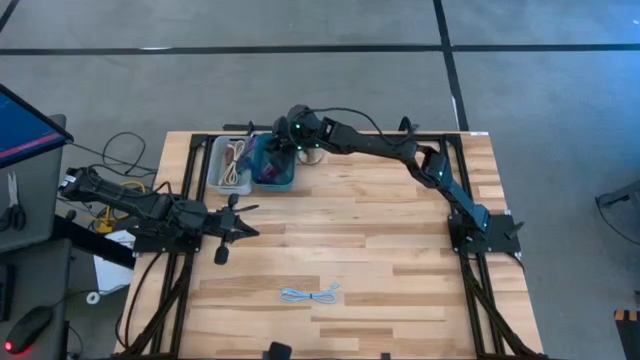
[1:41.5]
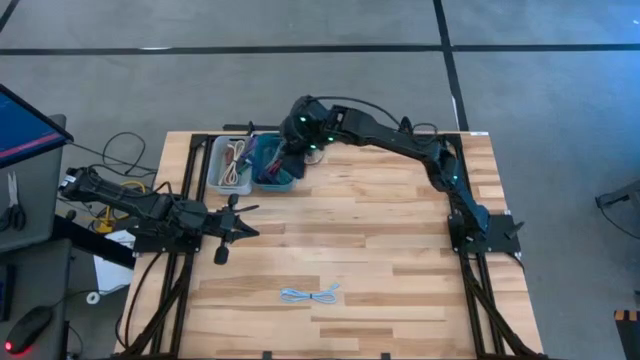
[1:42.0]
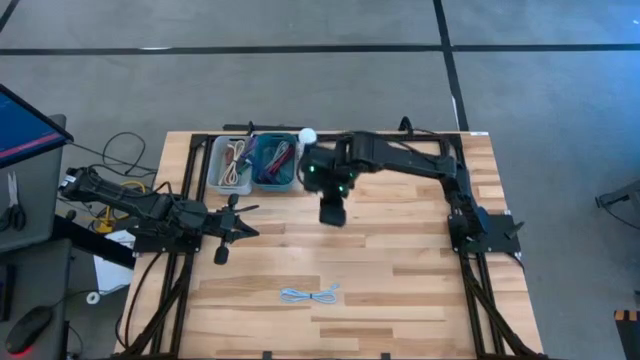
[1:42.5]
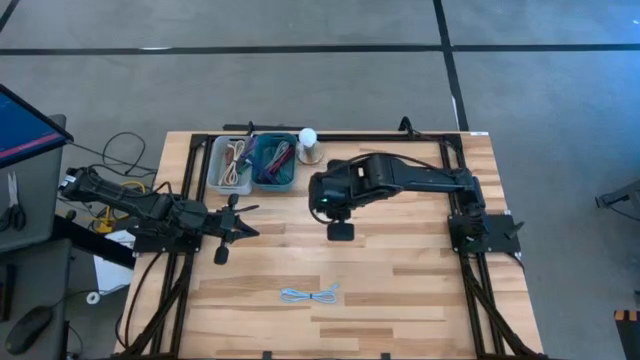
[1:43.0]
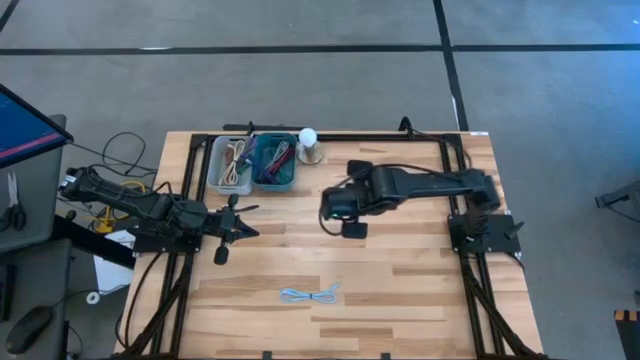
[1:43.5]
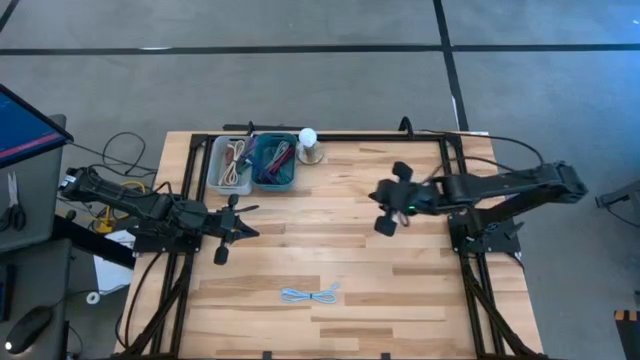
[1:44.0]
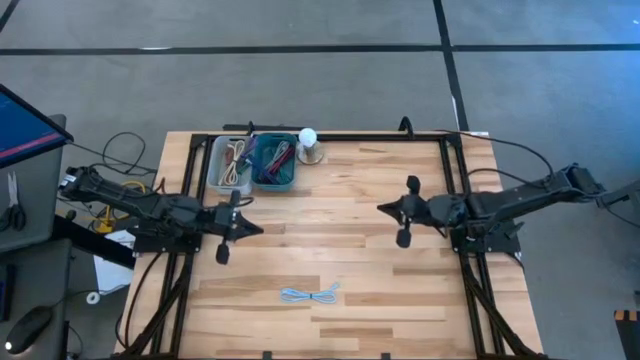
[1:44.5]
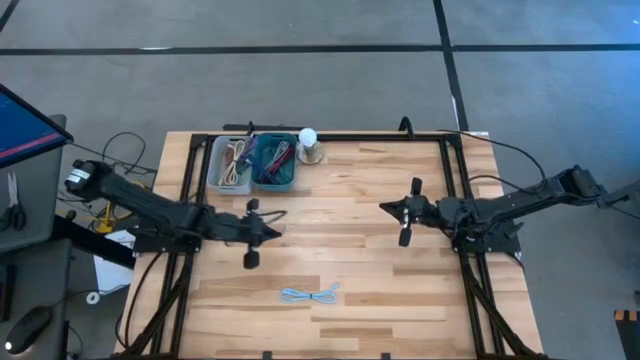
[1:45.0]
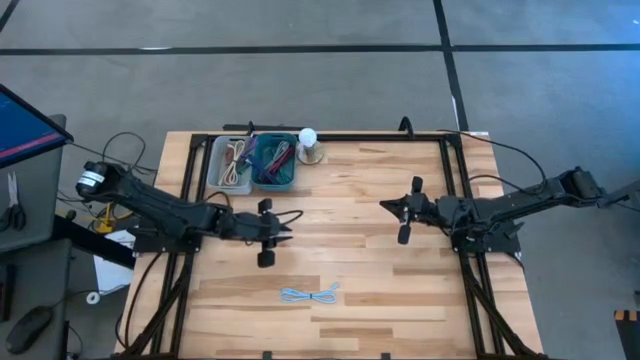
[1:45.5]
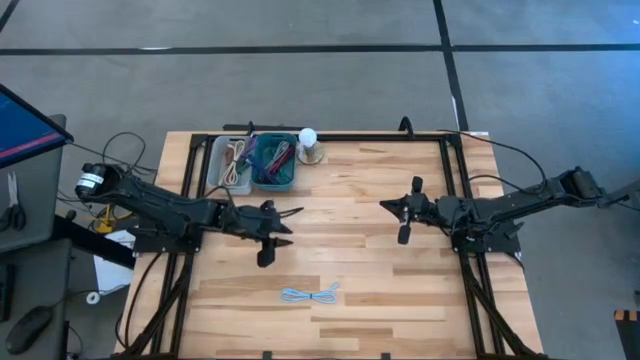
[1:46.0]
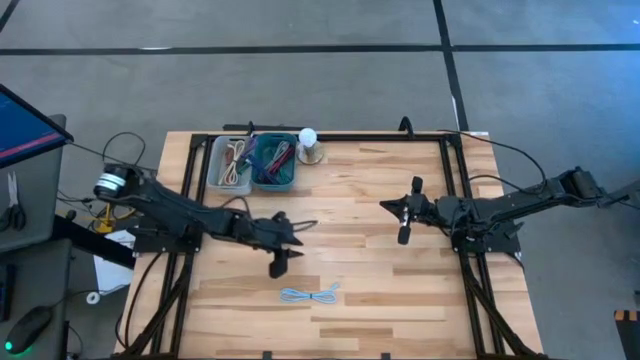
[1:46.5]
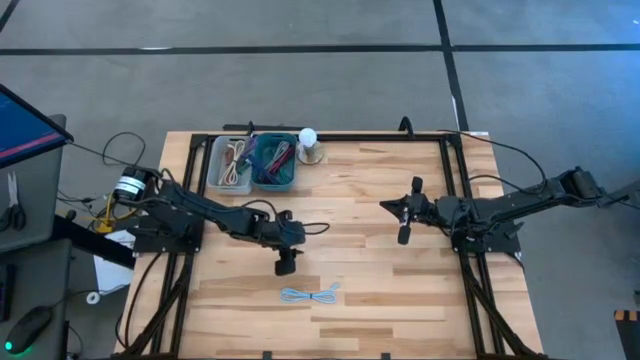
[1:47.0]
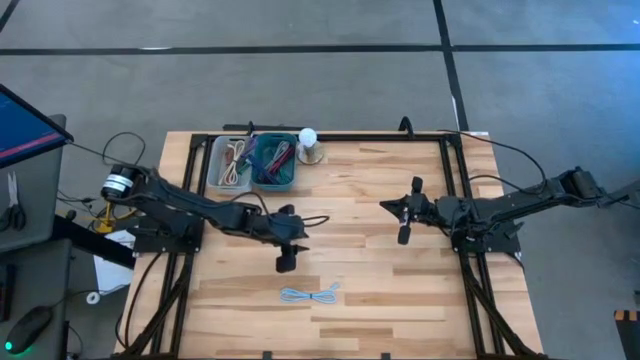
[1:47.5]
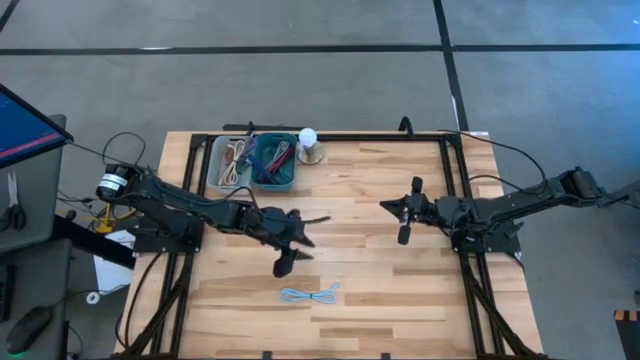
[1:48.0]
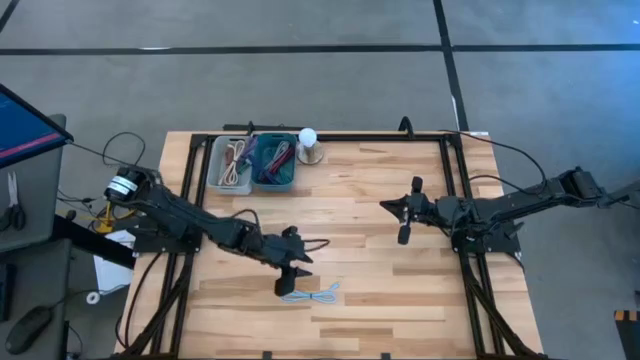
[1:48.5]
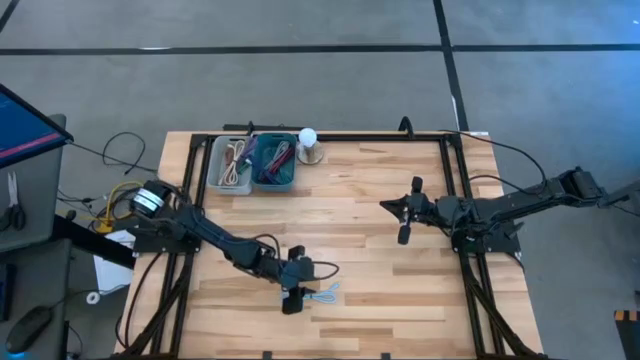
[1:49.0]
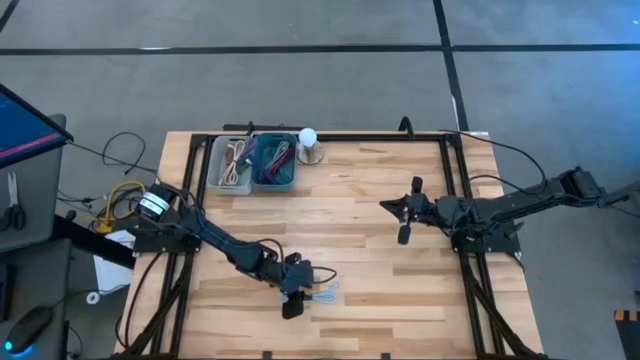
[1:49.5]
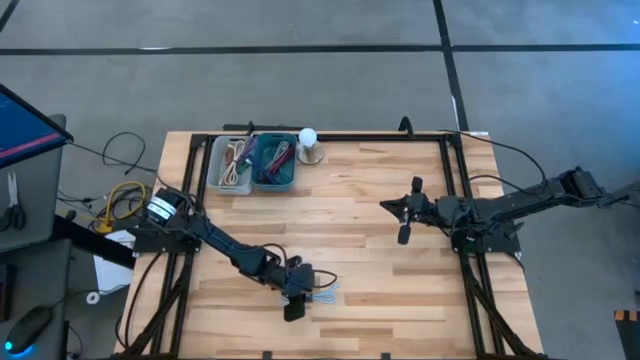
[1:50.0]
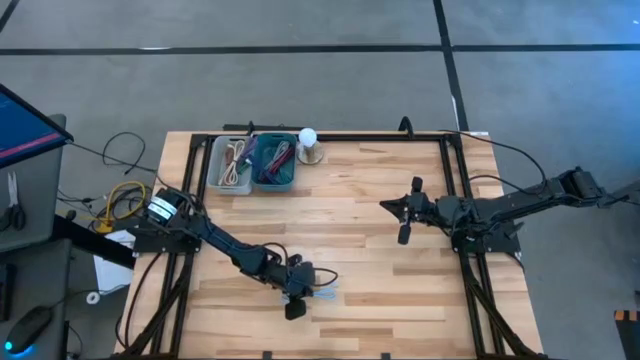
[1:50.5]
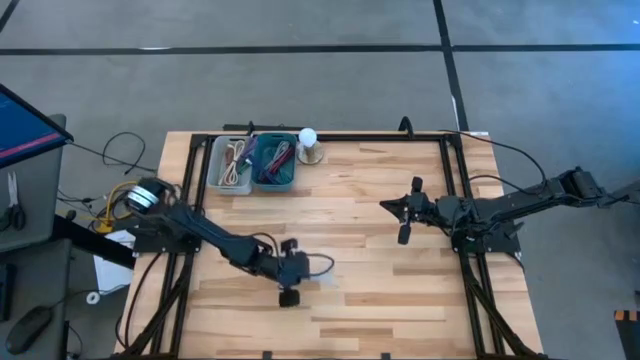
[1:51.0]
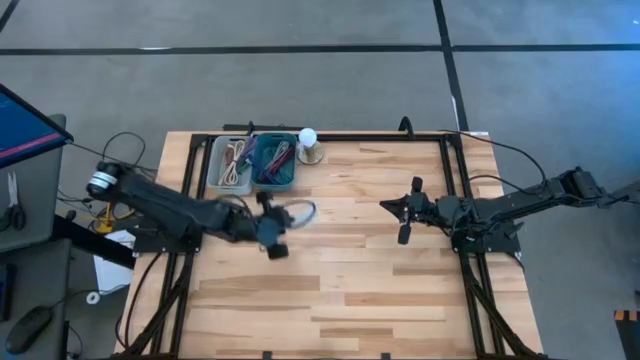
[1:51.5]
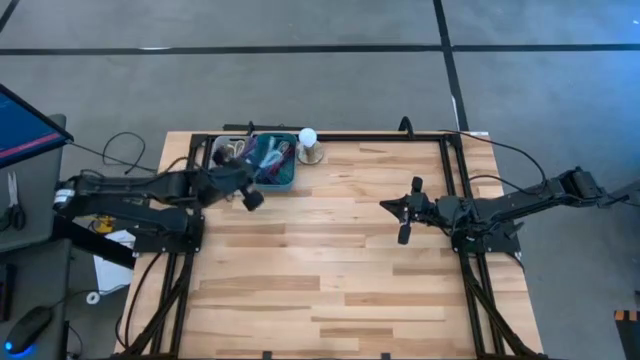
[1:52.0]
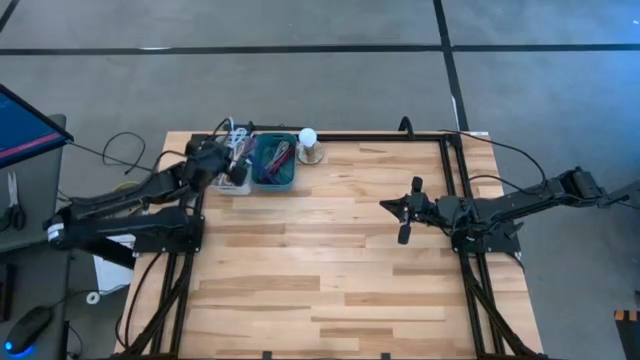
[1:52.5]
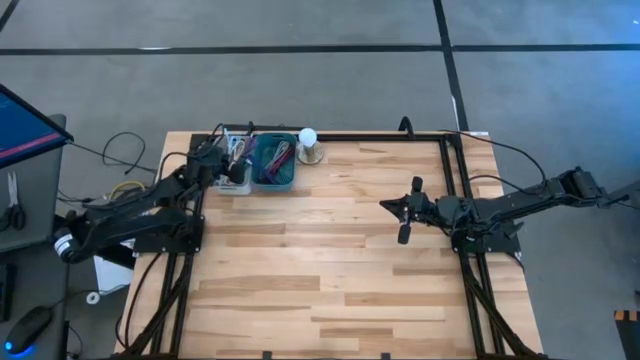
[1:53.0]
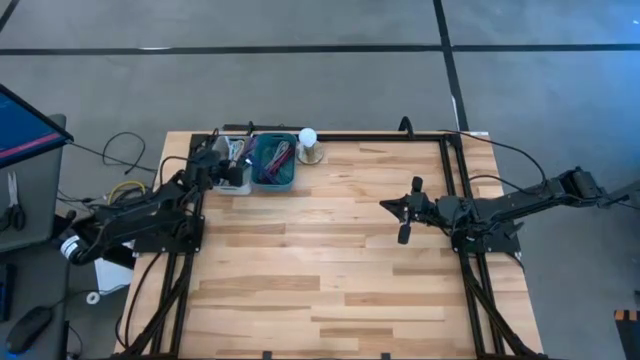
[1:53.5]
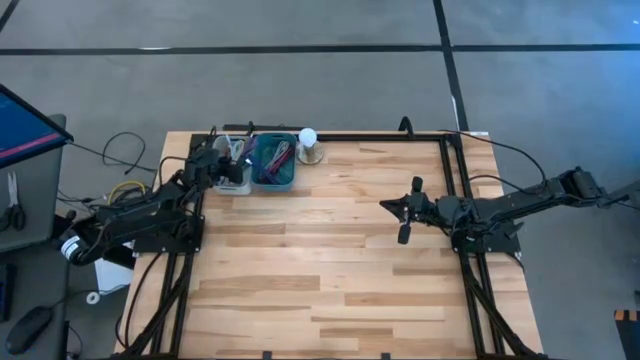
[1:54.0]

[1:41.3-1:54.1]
Task: Pick & Place USB Port
Put the light blue charger cable into the gray bin

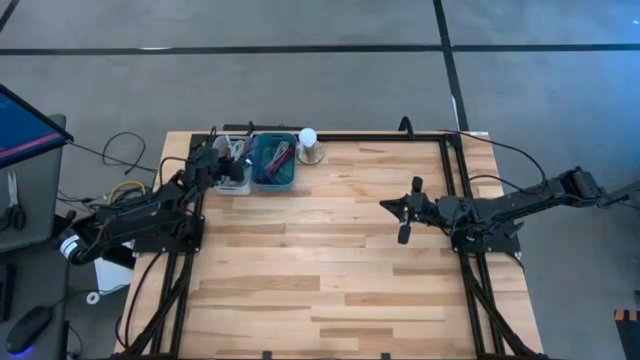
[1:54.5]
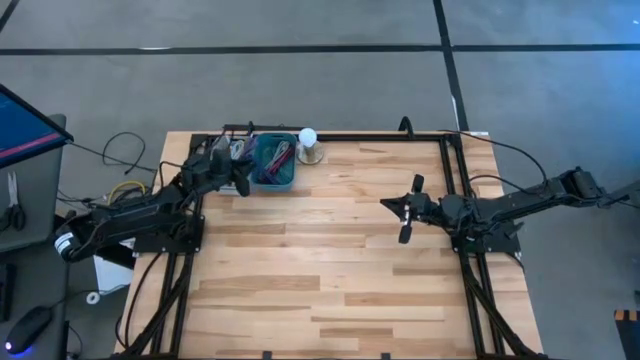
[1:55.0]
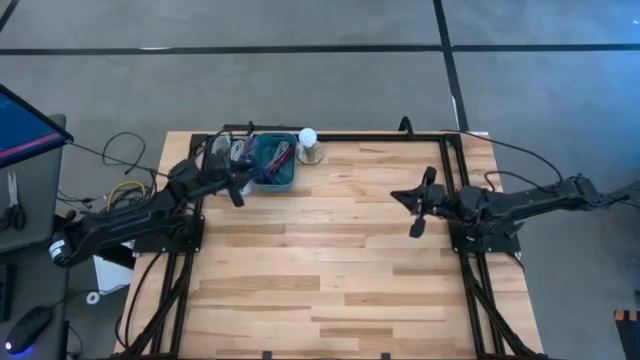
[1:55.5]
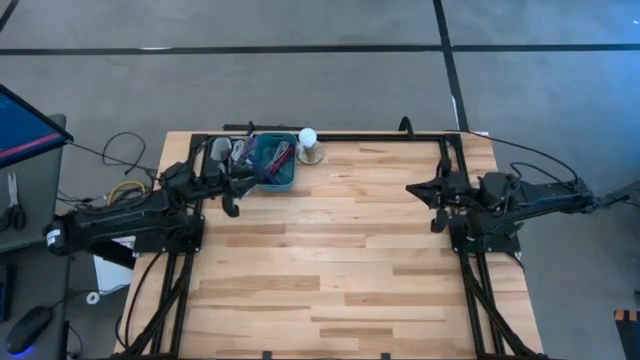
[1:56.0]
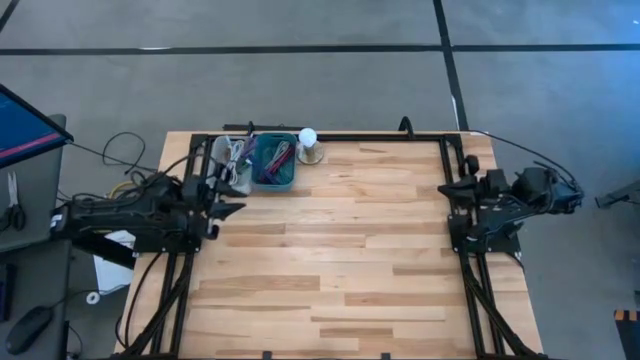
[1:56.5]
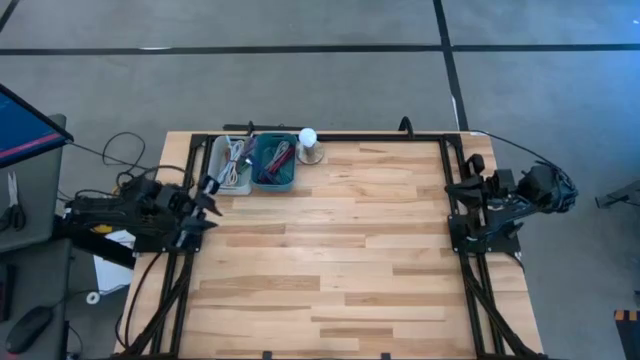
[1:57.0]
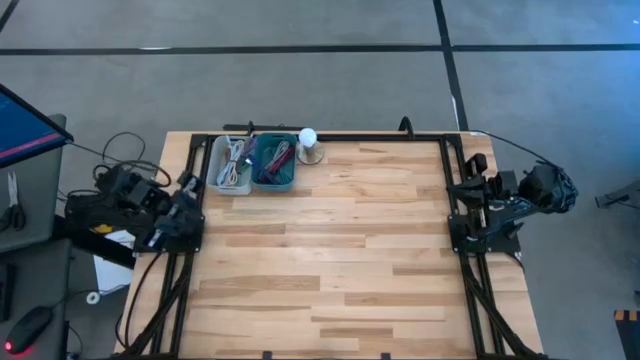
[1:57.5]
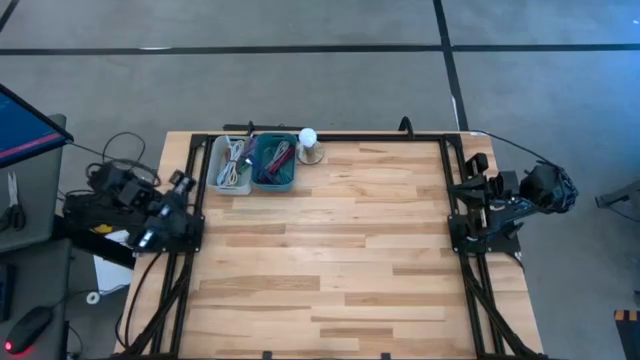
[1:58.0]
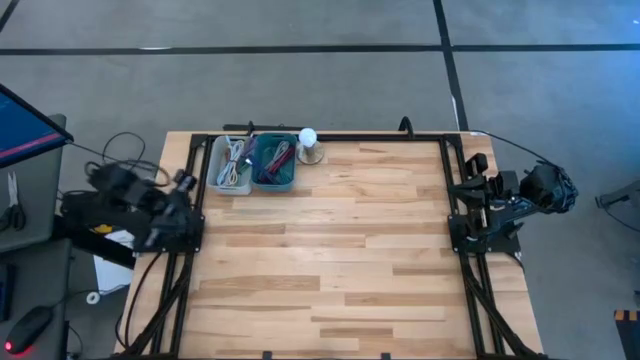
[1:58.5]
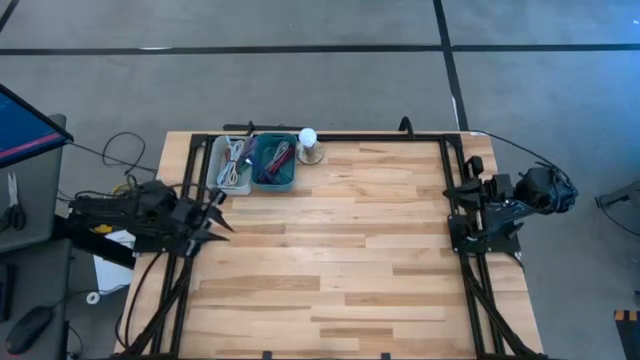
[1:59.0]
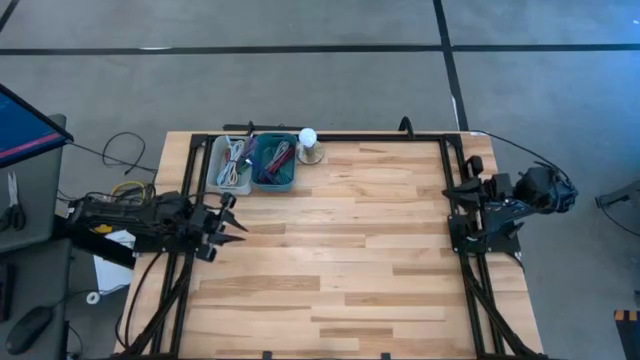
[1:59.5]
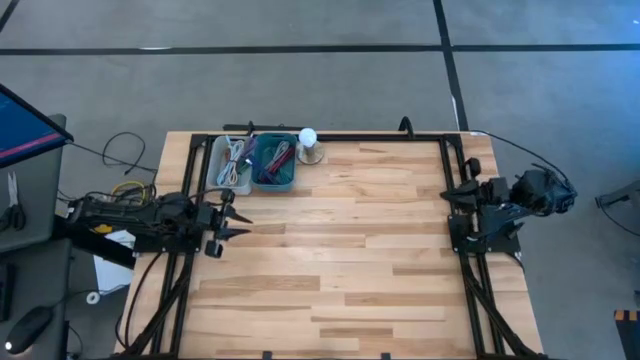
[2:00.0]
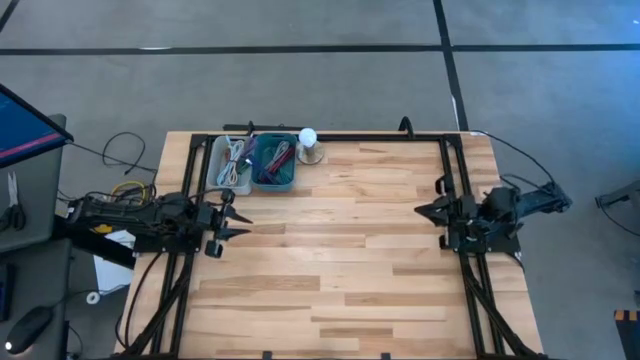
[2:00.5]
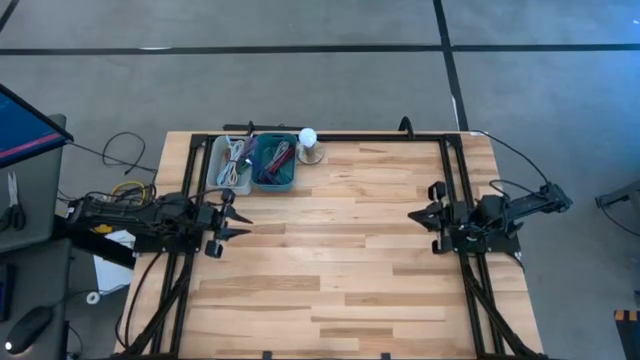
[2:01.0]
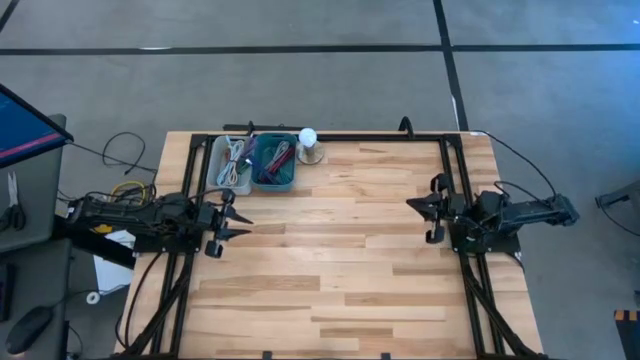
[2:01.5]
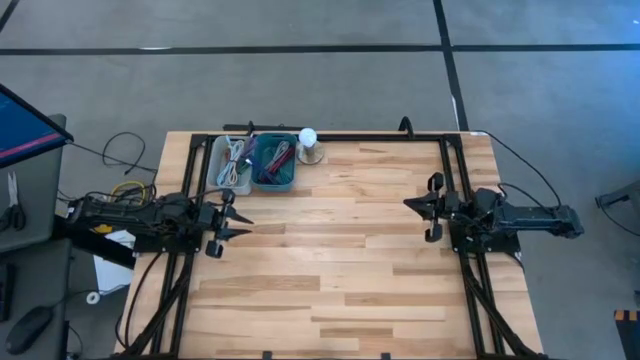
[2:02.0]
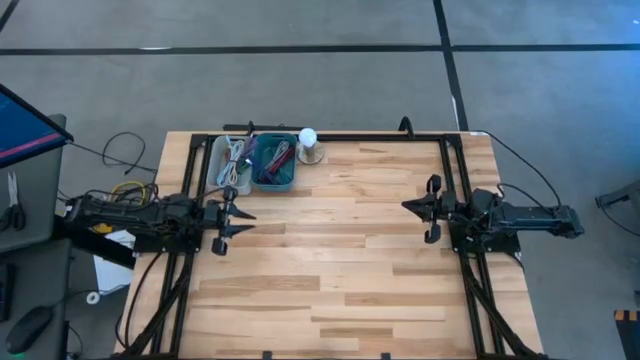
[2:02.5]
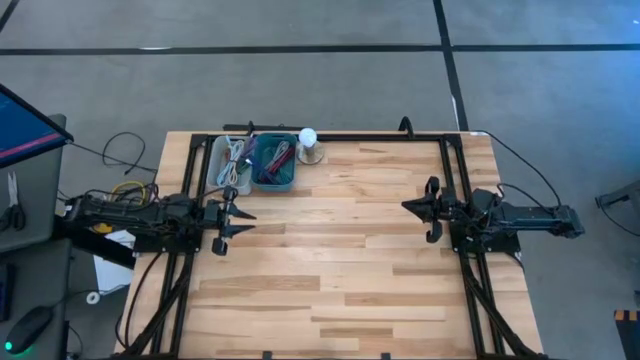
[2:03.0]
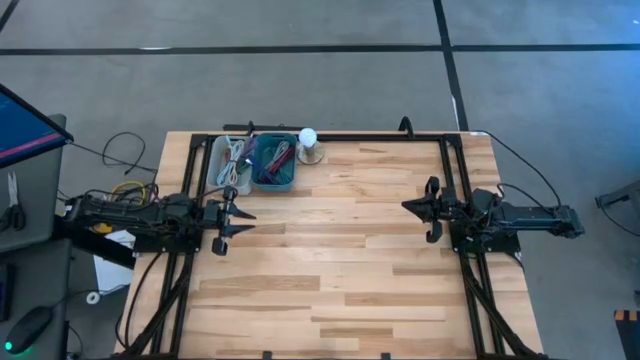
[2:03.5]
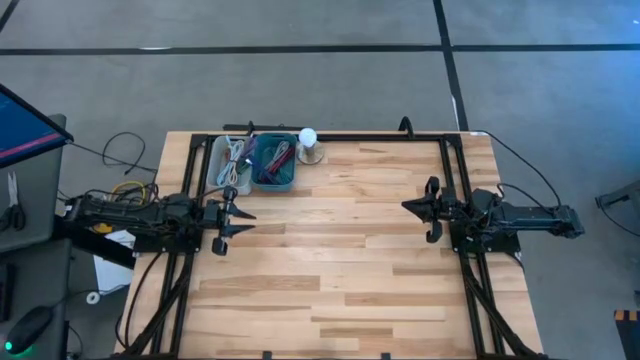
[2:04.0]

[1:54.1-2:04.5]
Return to Home Position
